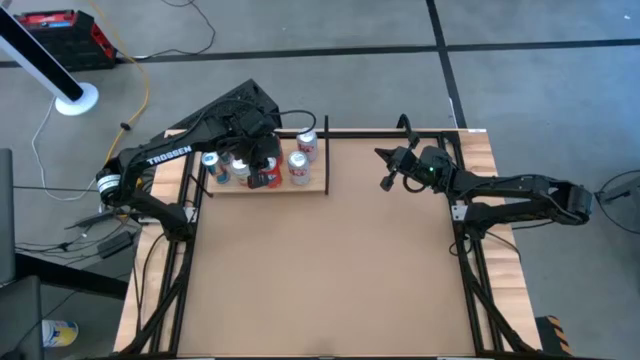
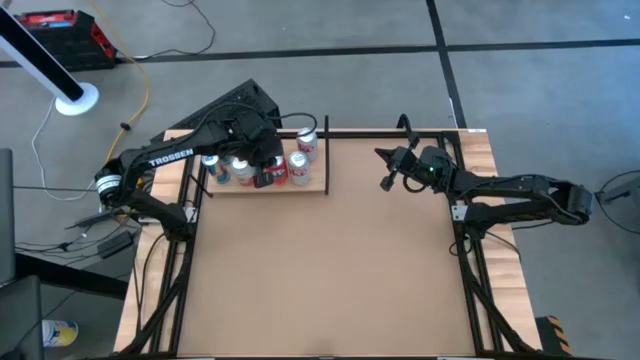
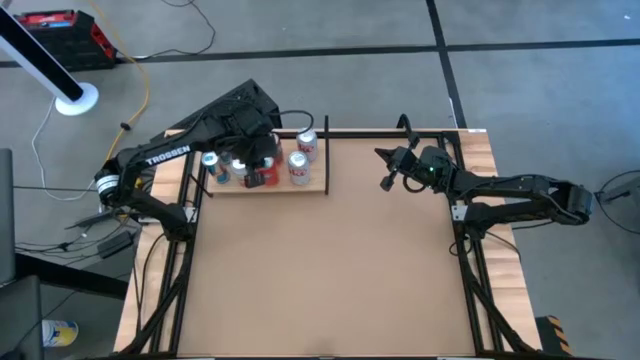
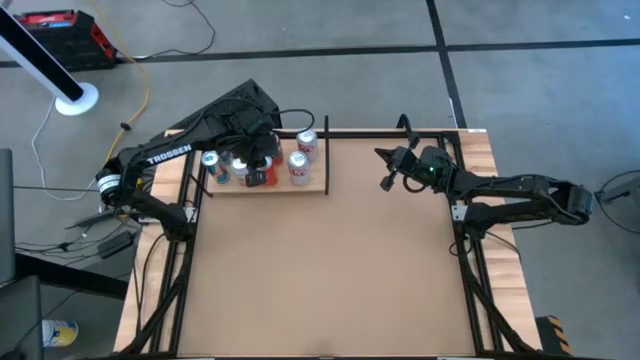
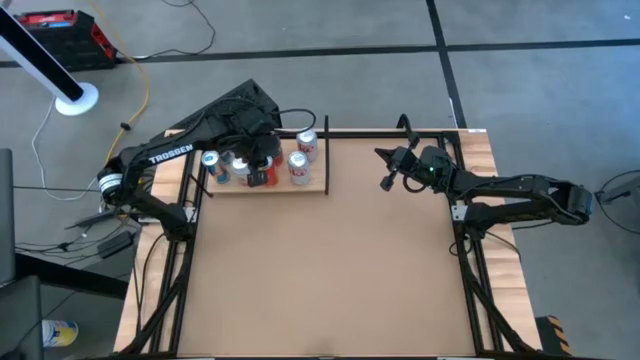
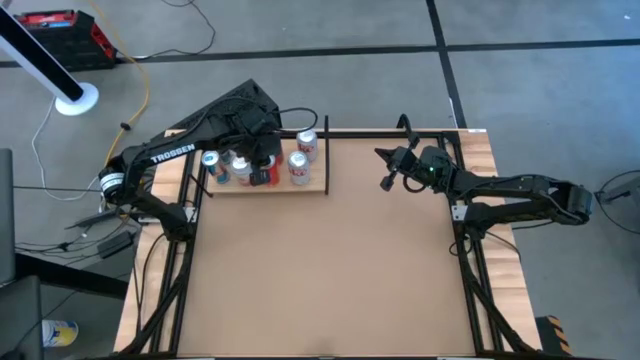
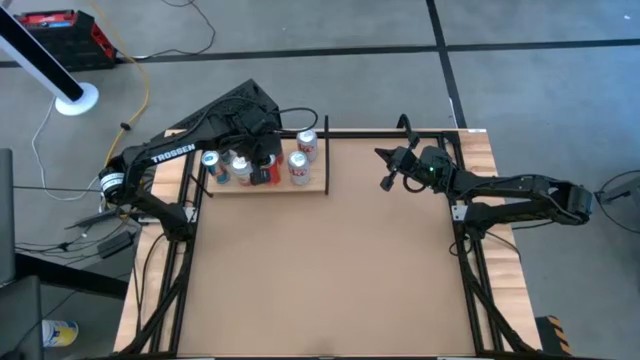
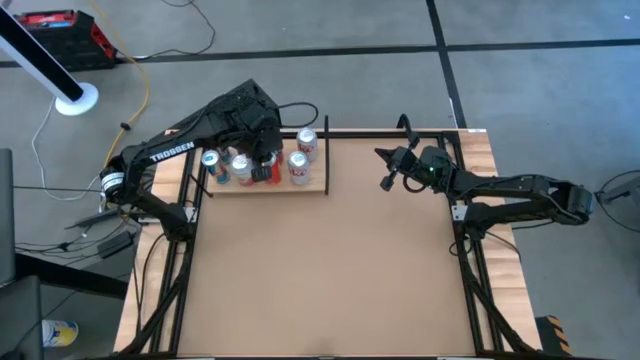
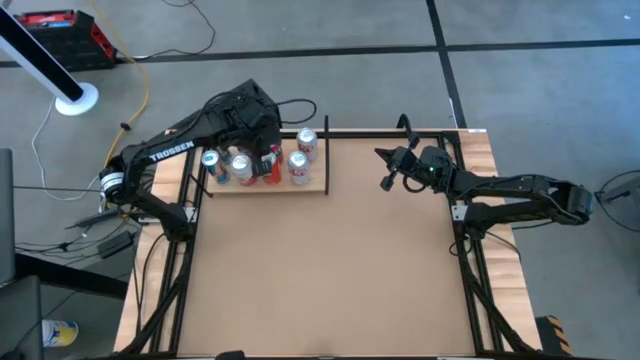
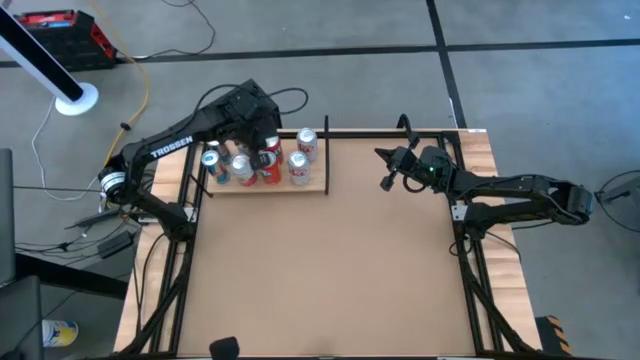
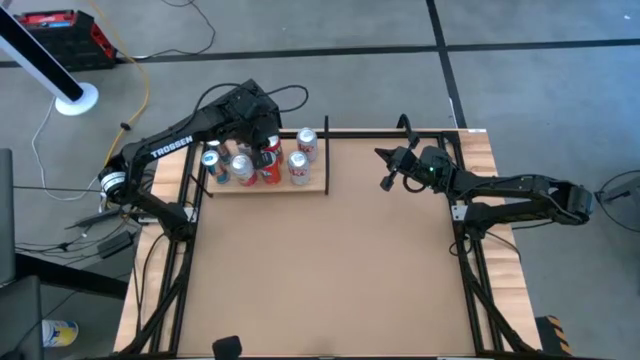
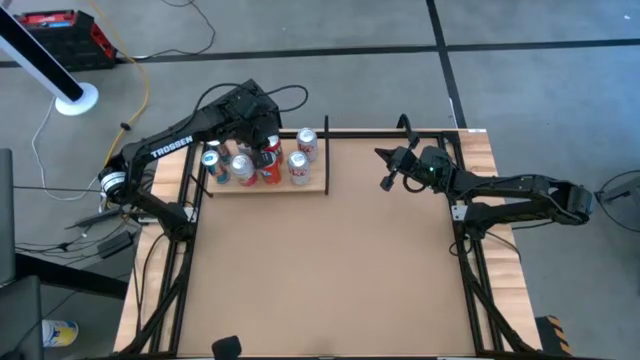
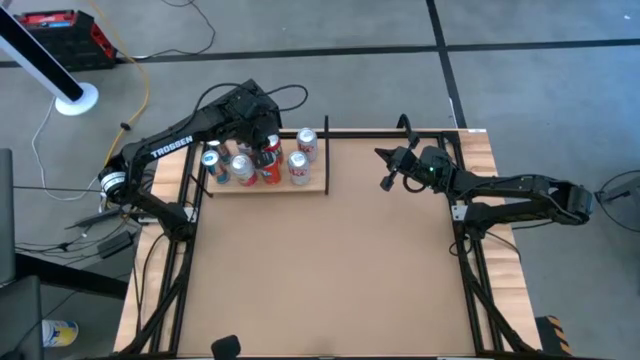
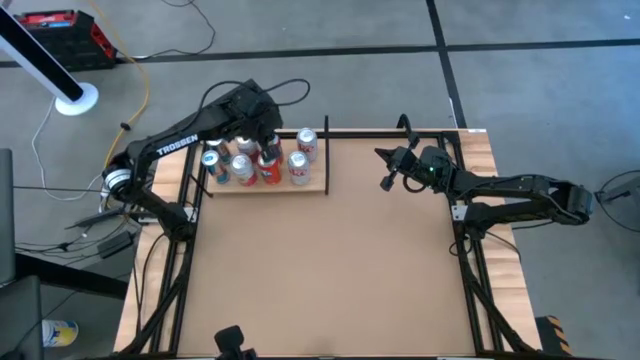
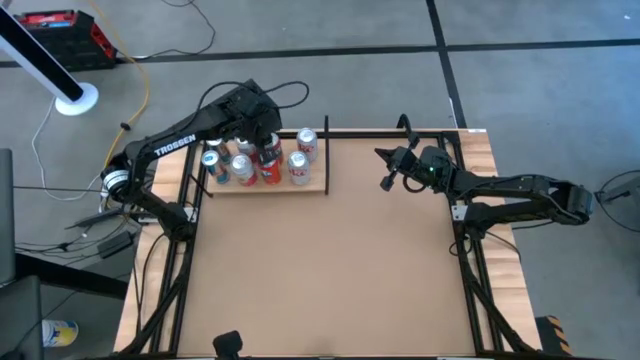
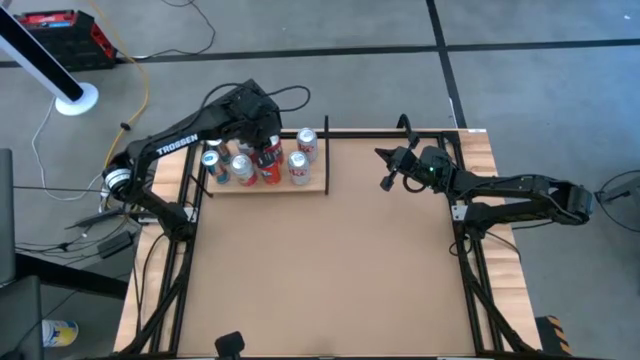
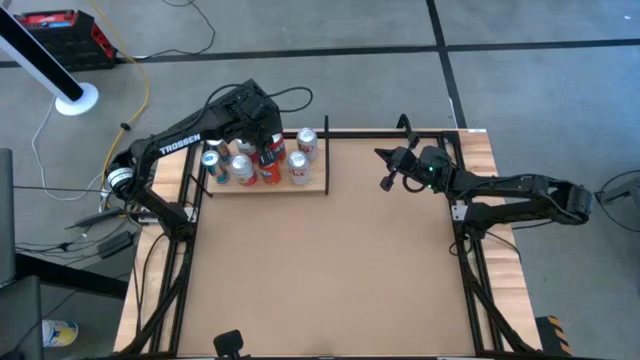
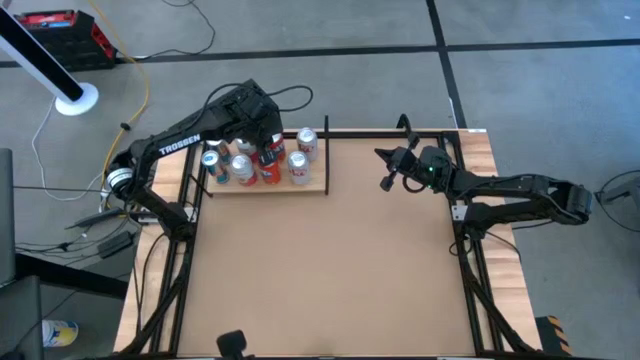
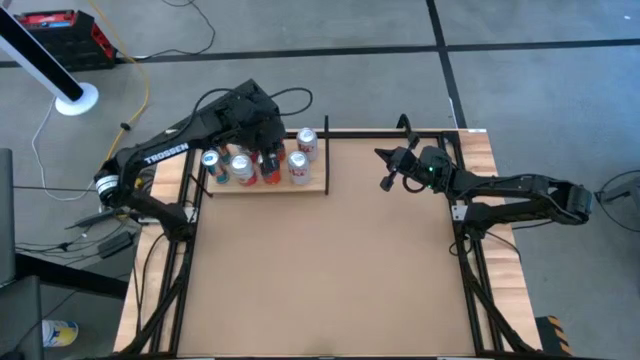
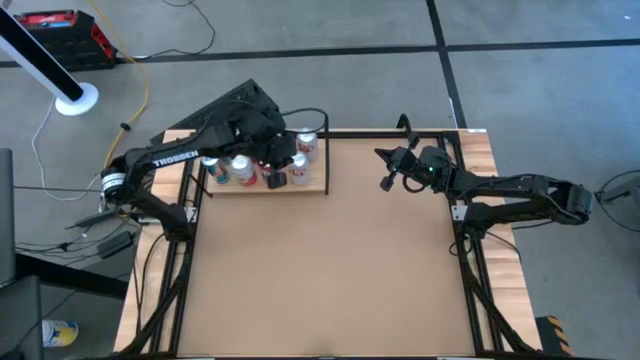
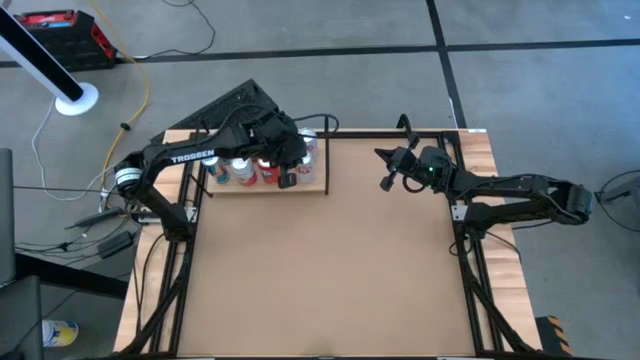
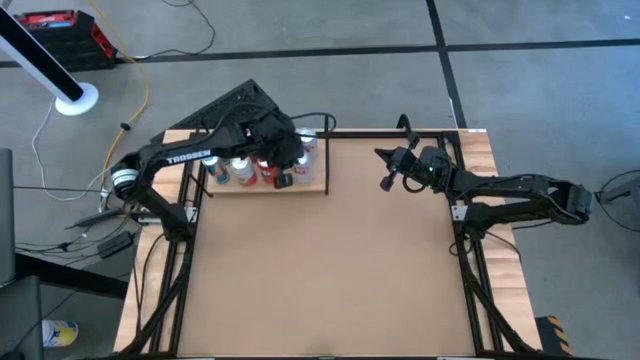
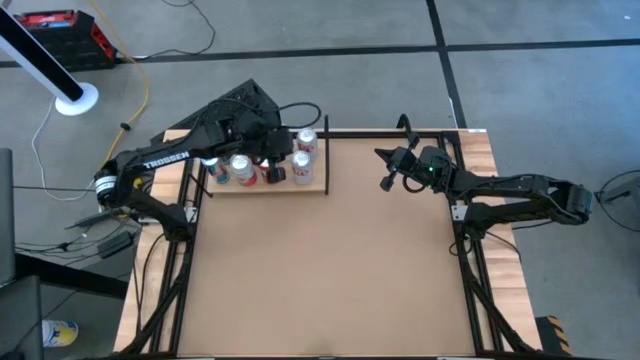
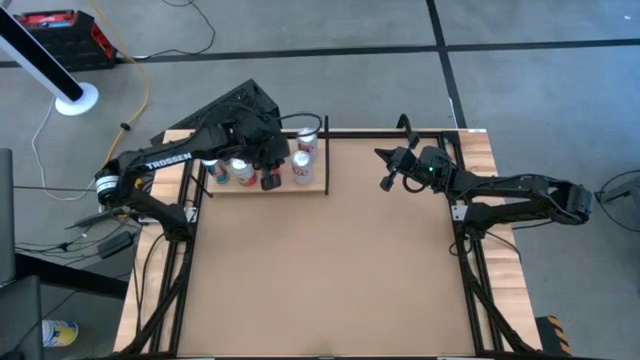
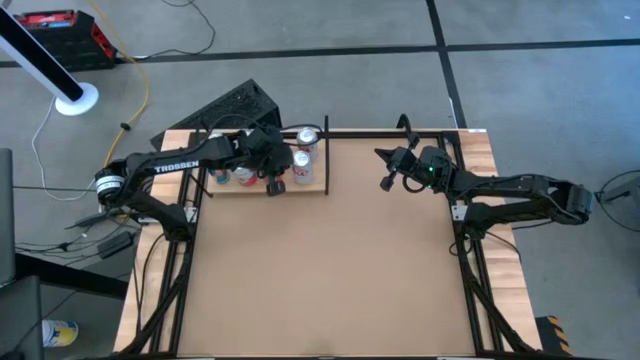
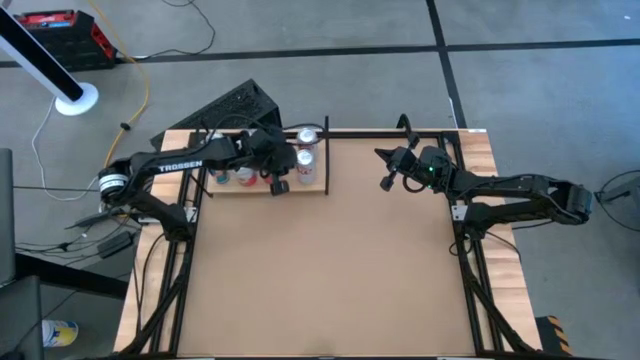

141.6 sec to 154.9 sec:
Task: Place canned beverage on shelf
Adjust the soda cans on the shelf

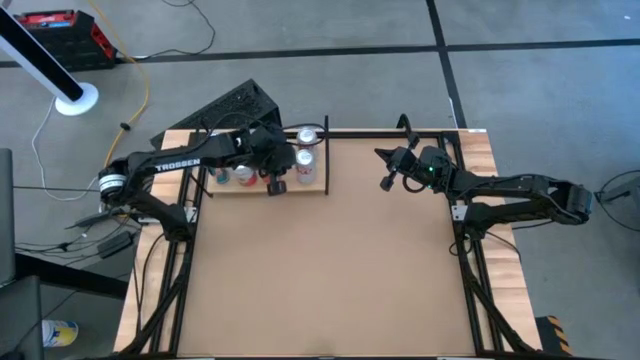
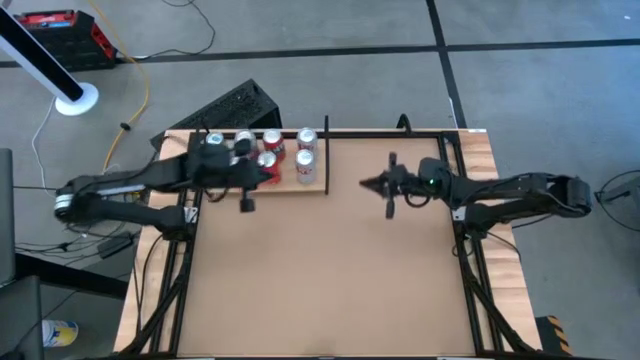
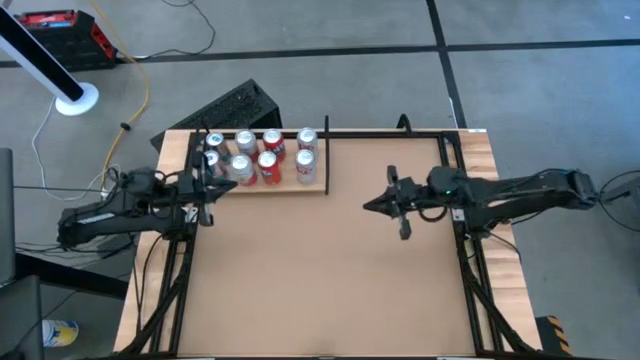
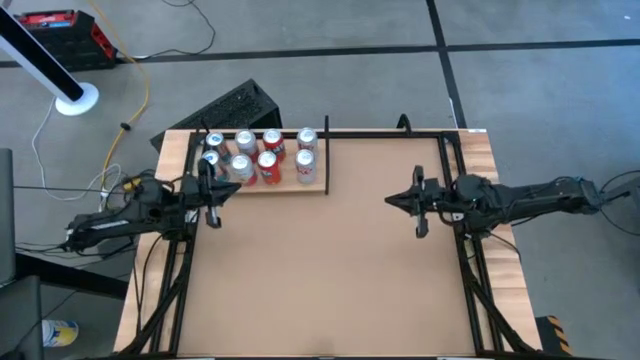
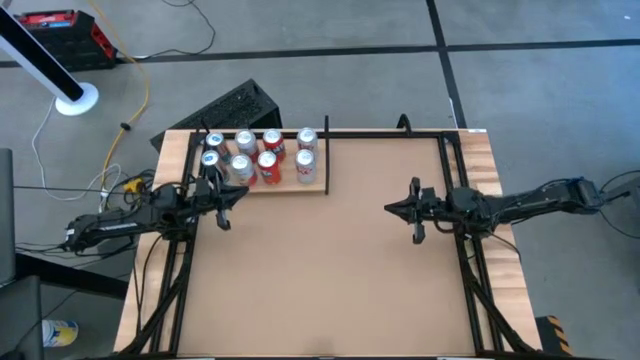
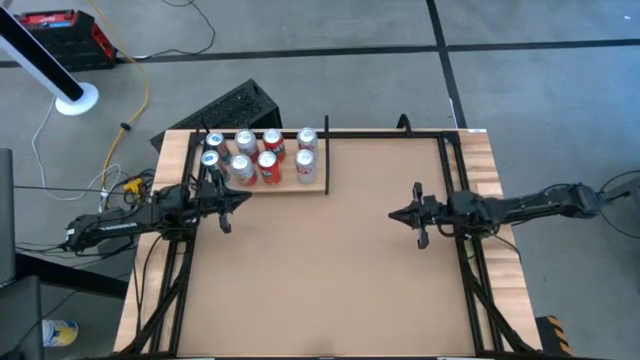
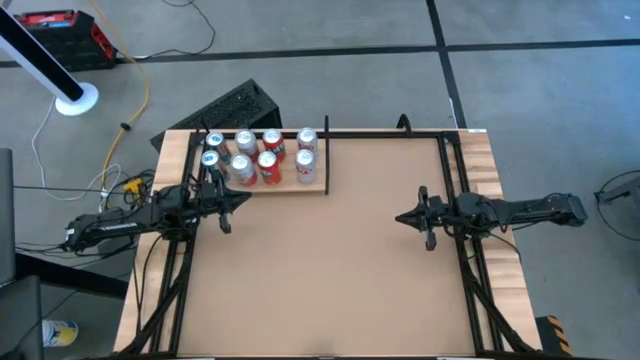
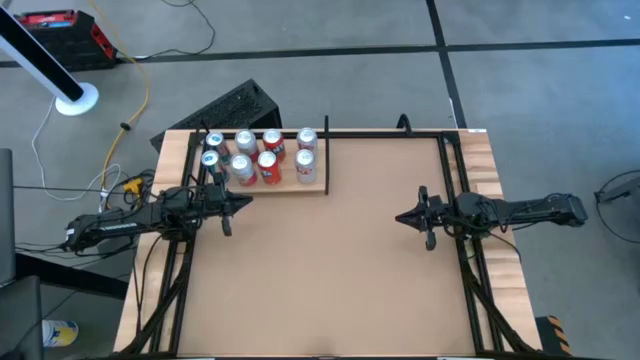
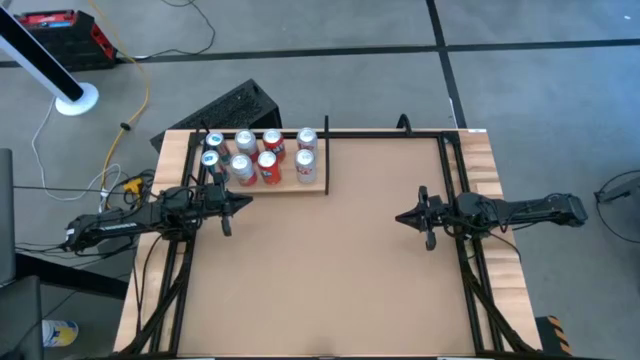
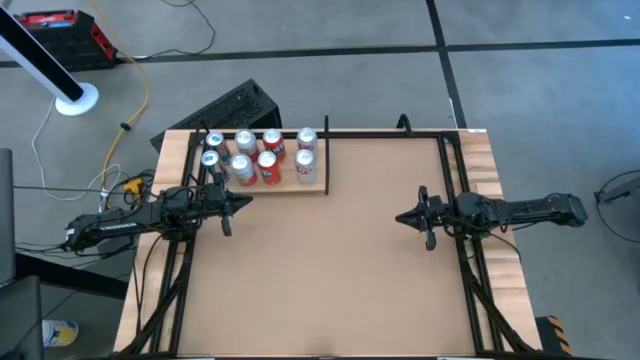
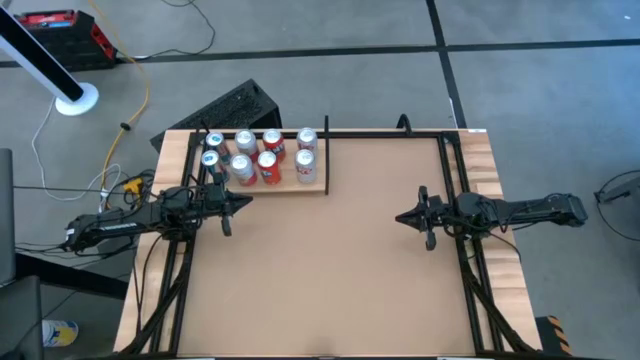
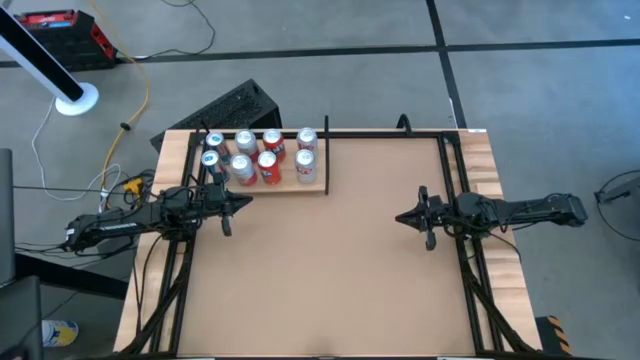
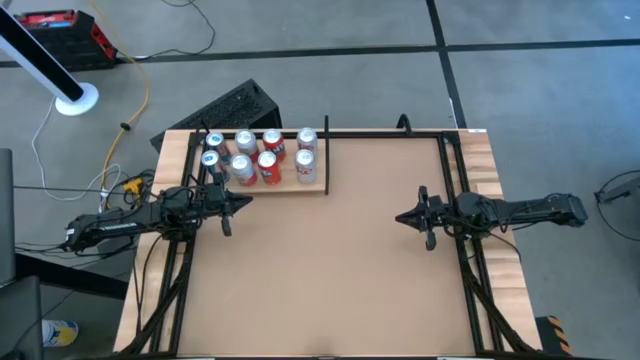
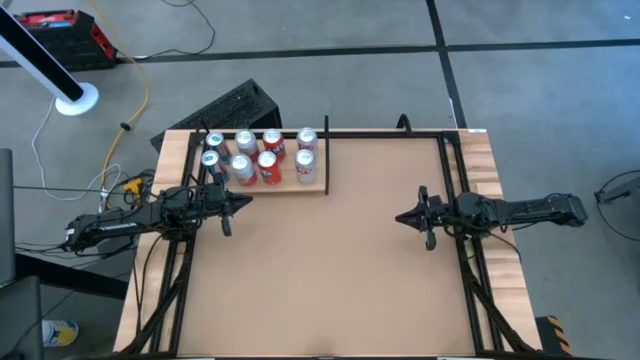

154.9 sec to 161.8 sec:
Return to Home Position

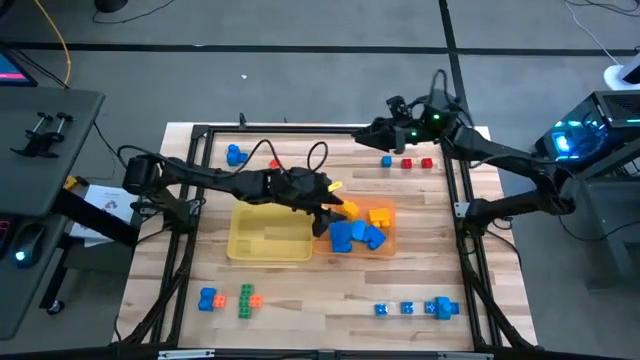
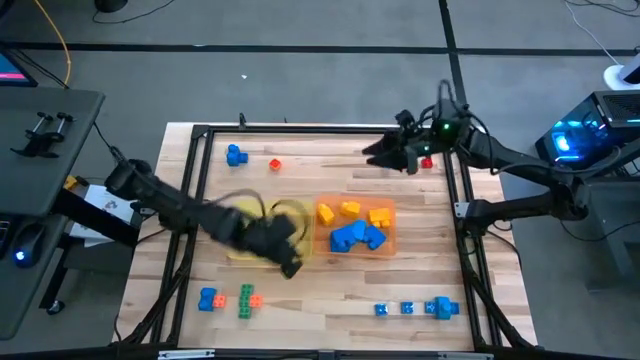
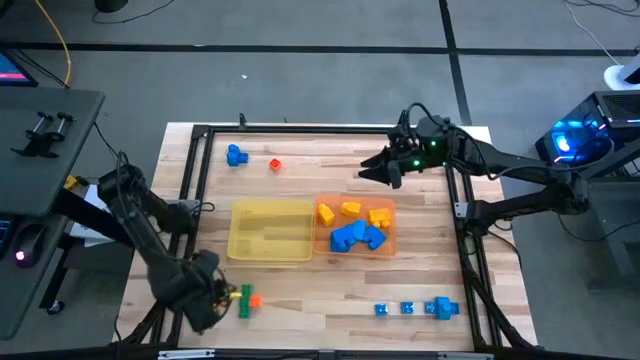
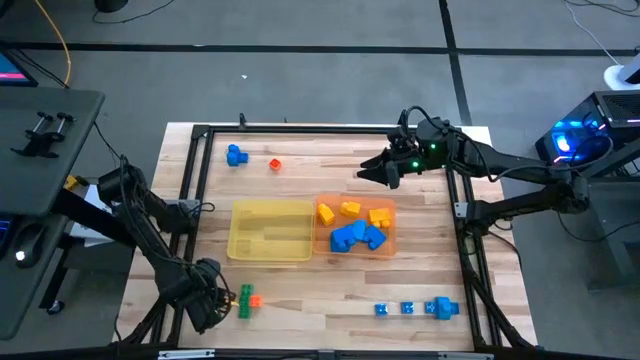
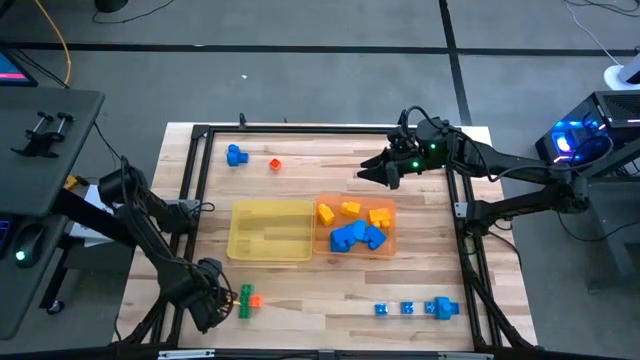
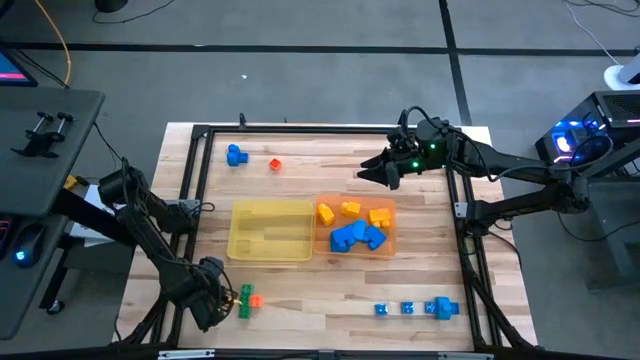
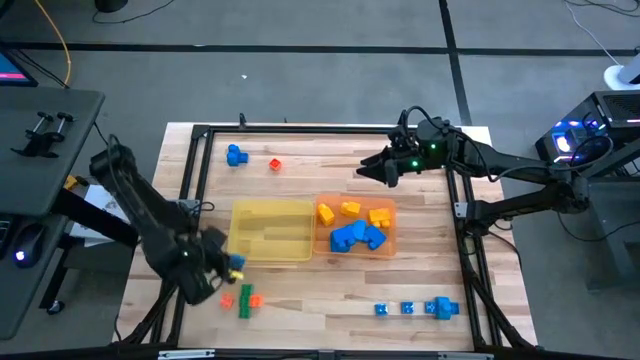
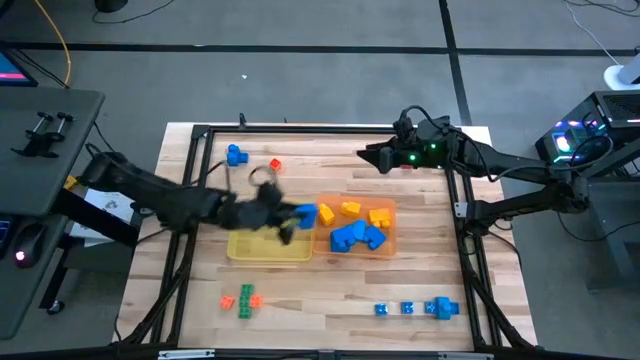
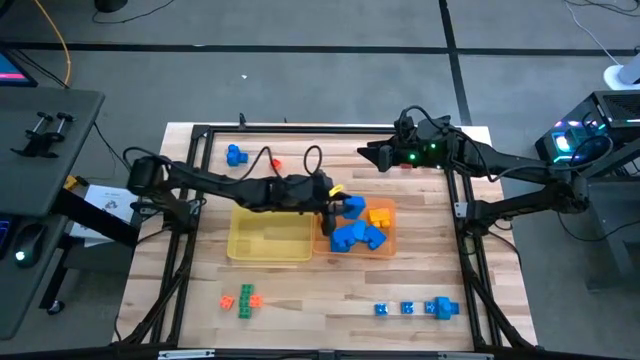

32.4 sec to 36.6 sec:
Task: Sort blocks by size
Put the large blue game piece into the orange bin
